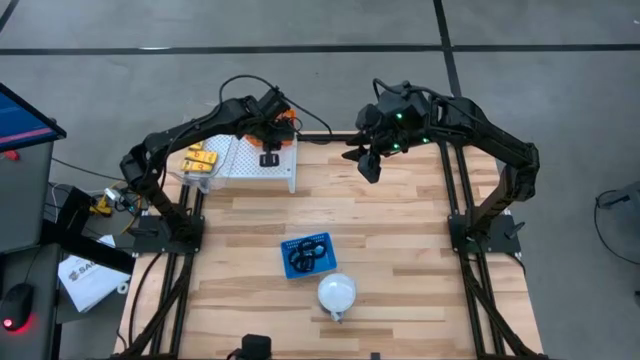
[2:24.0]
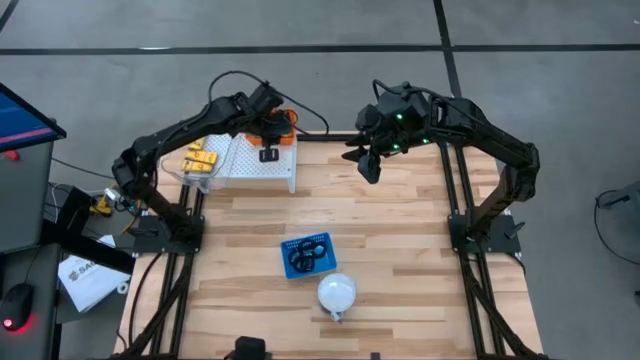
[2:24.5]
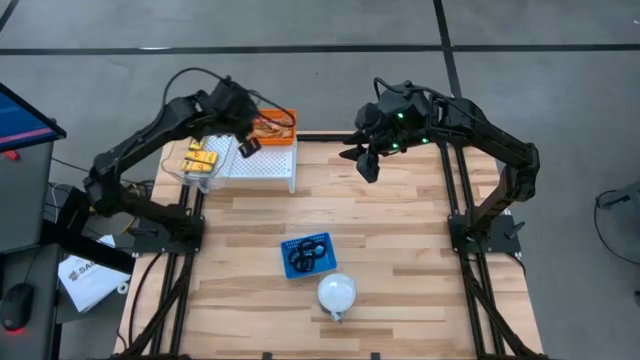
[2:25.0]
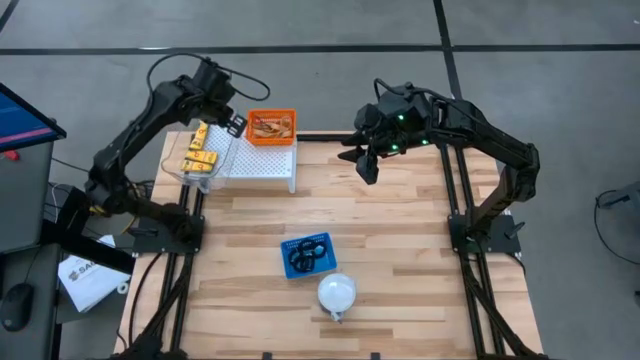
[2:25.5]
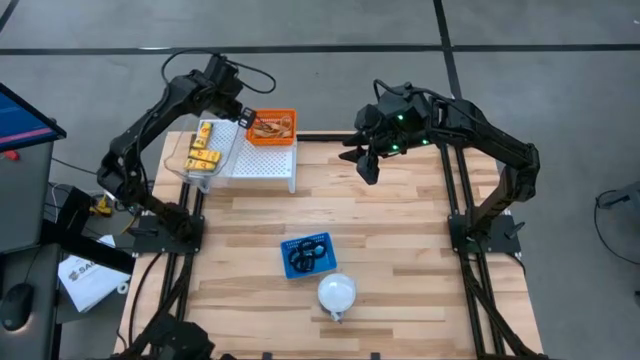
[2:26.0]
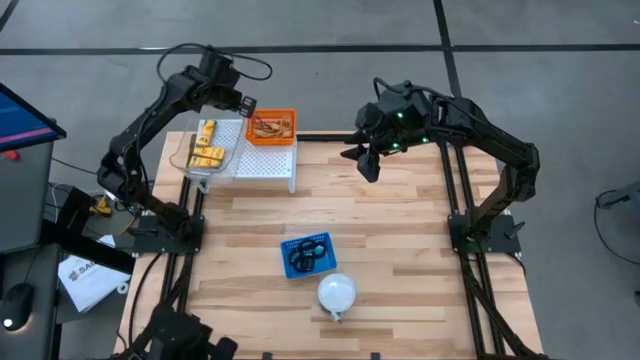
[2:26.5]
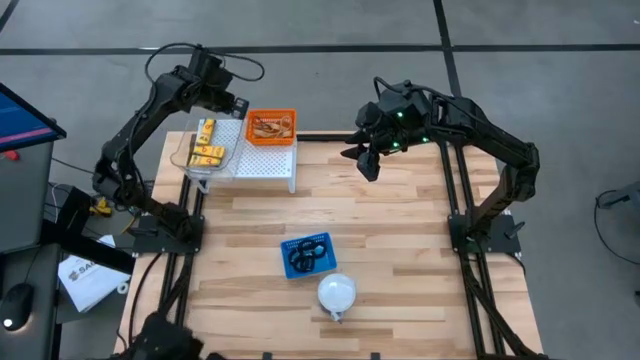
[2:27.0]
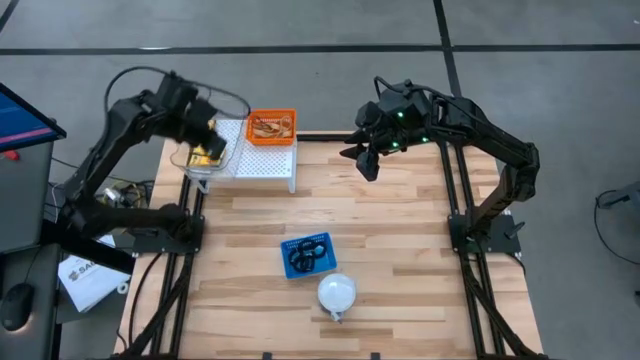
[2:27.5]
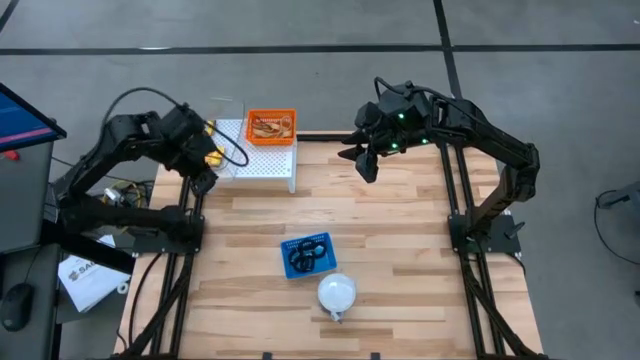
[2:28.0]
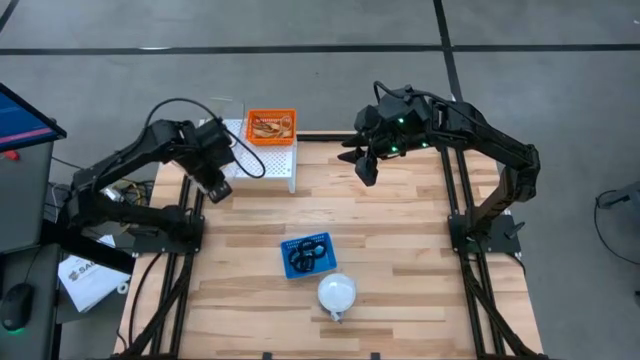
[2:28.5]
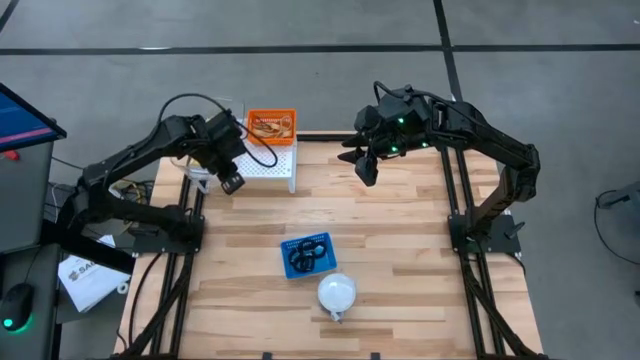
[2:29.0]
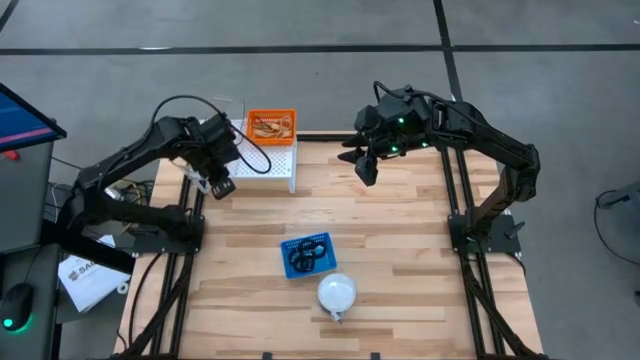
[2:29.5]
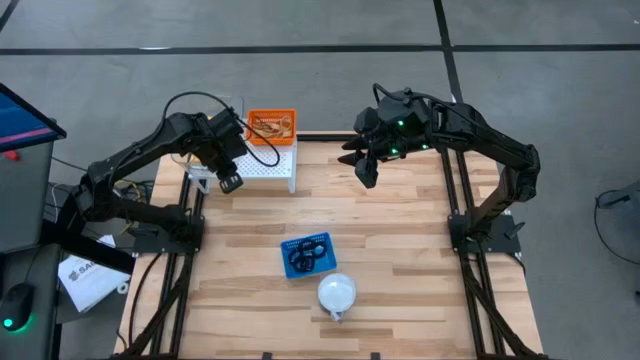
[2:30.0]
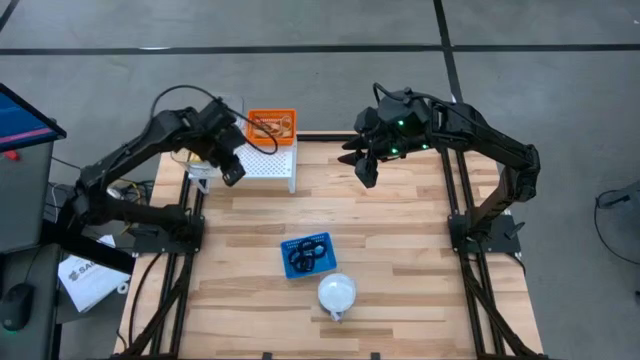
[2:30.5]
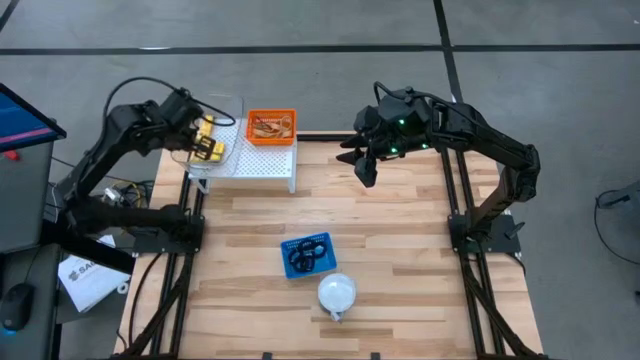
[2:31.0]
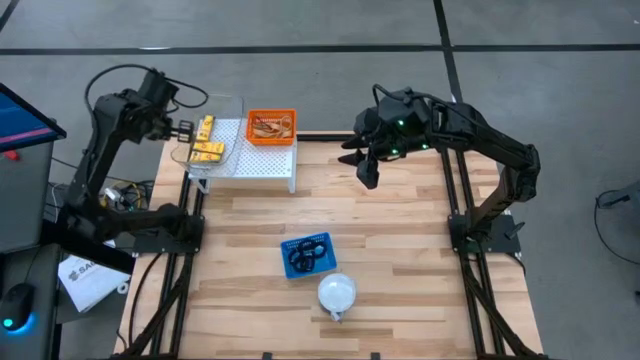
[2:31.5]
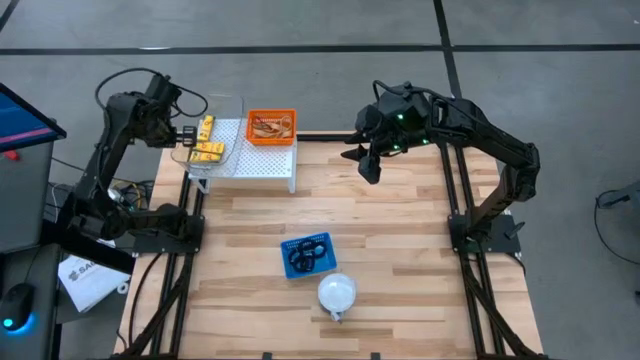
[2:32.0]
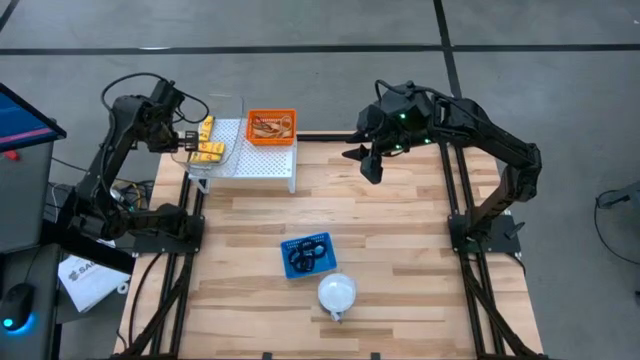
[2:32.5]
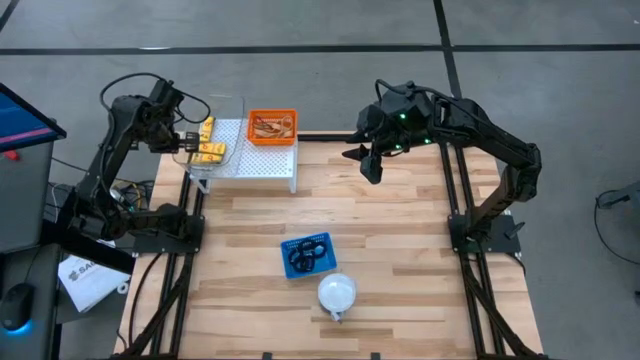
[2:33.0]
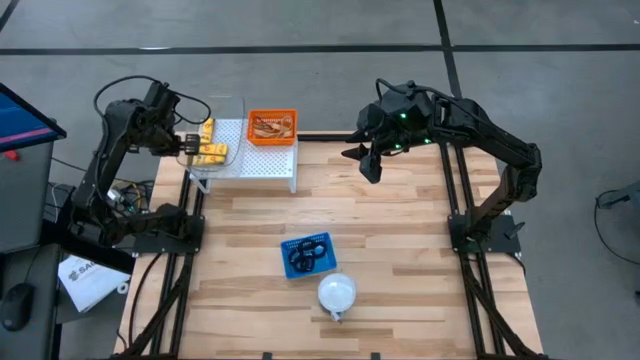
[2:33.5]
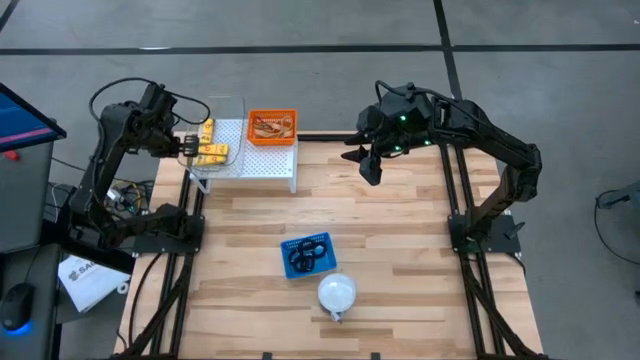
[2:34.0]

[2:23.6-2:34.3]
Task: Pick & Place Office Desk Supplies
Adjust the transparent bin on the shelf

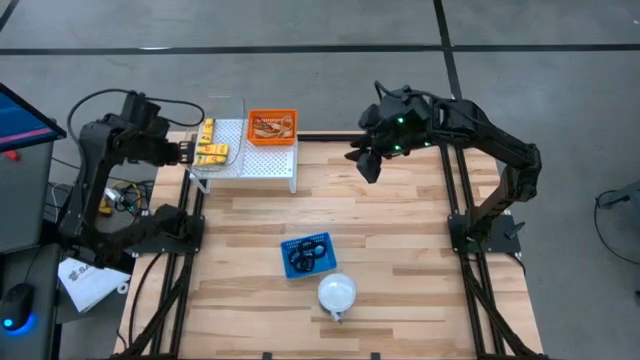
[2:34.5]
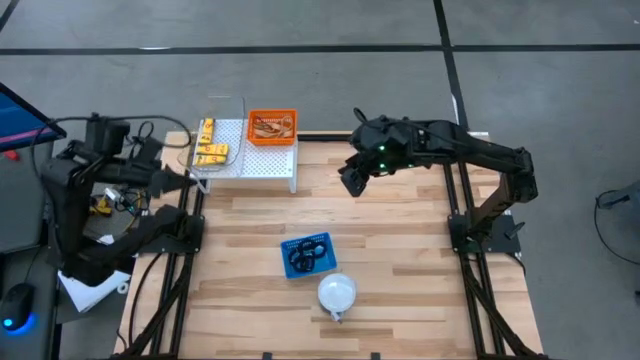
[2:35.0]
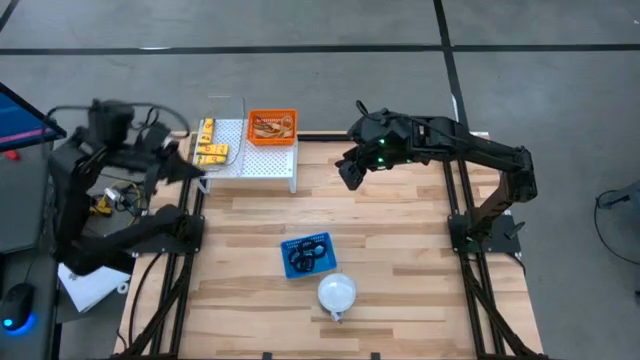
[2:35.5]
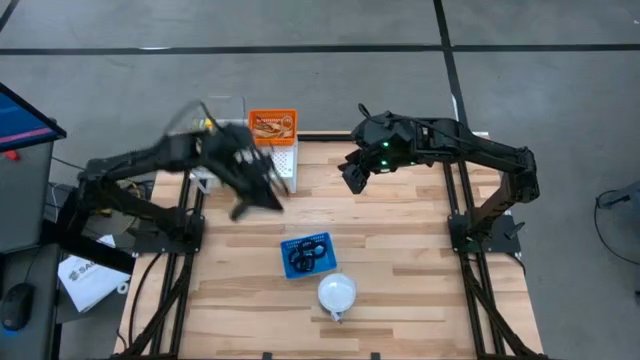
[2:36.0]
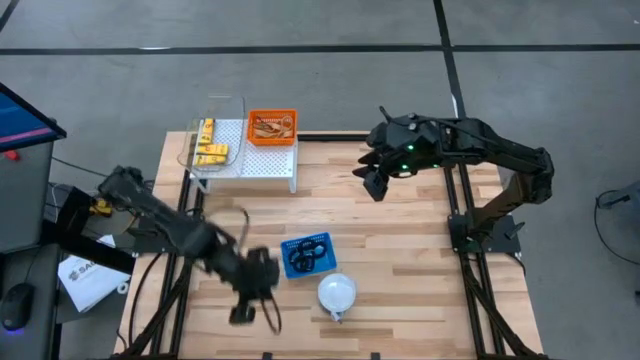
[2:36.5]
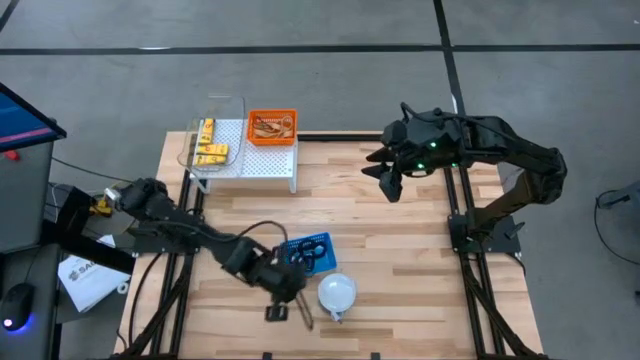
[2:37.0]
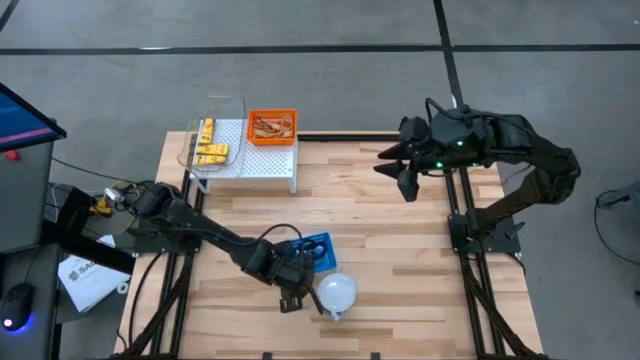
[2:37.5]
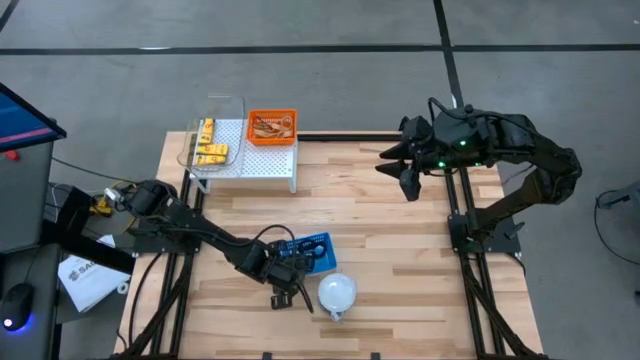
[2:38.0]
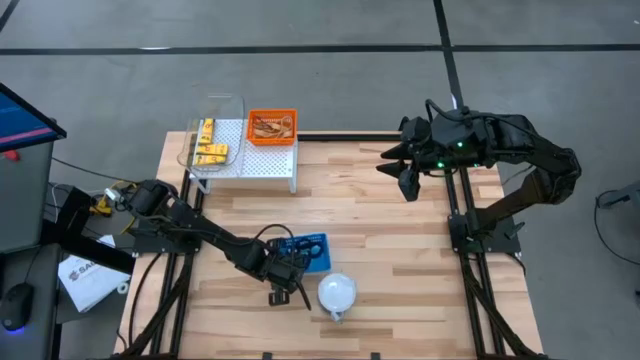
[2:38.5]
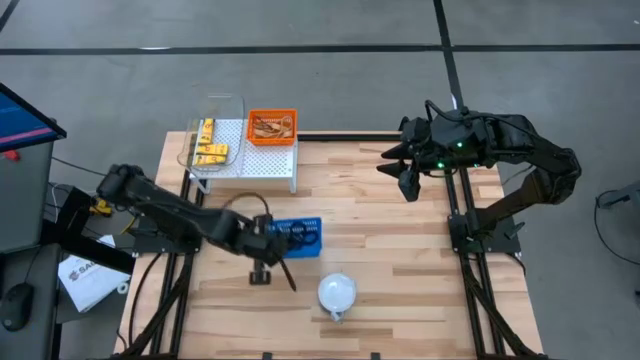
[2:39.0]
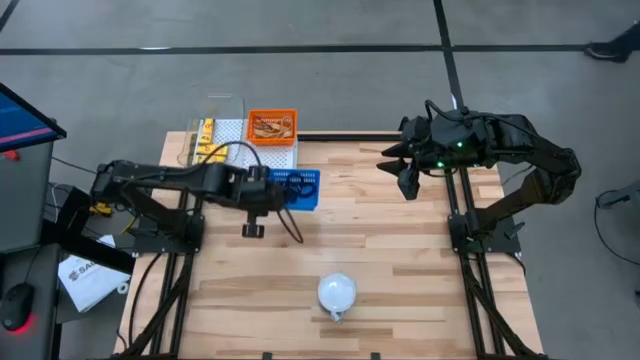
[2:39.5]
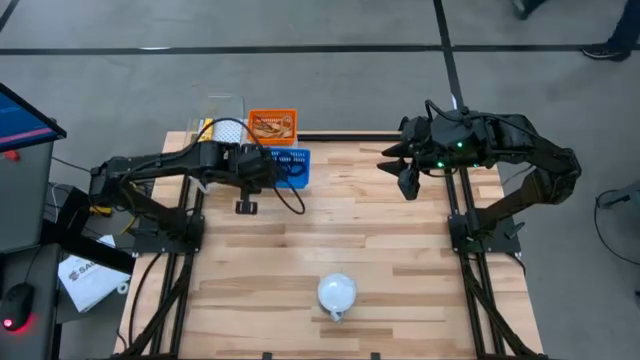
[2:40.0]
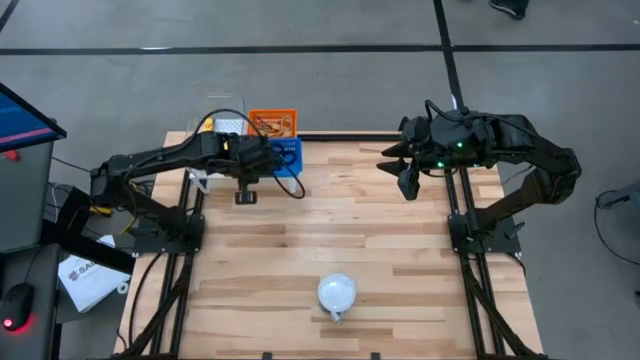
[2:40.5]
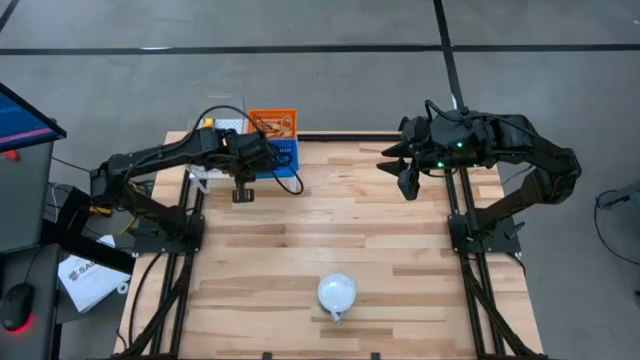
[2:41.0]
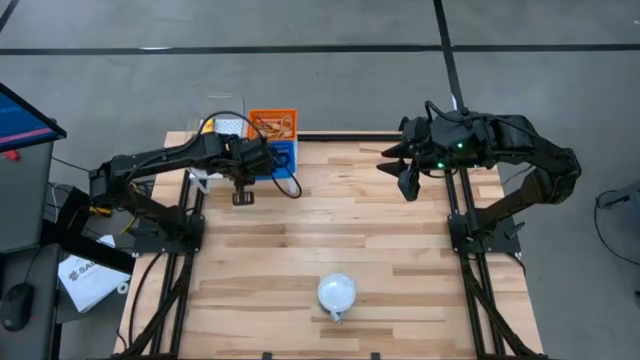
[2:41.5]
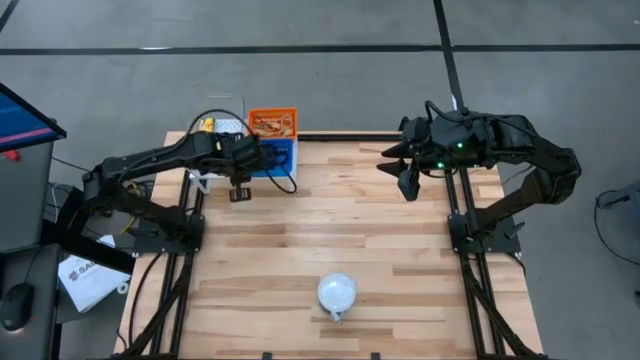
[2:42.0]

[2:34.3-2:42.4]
Put the blue basket with filled spring keychains on the shelf

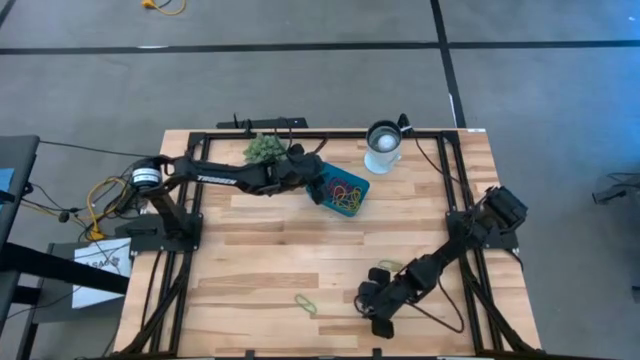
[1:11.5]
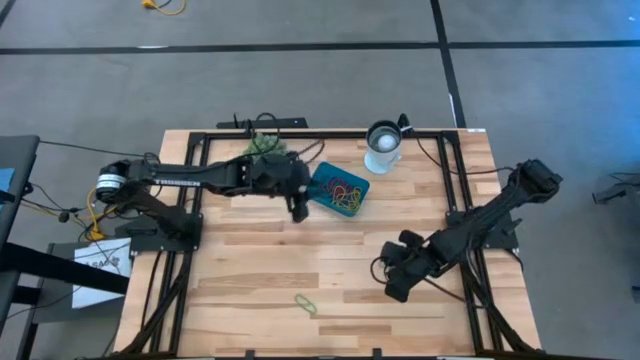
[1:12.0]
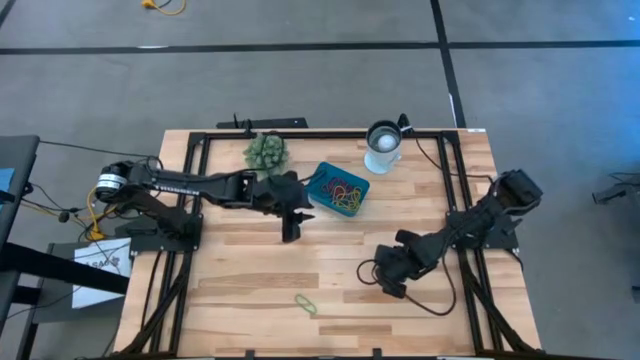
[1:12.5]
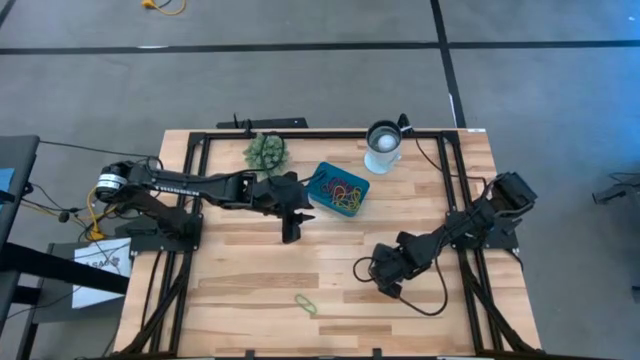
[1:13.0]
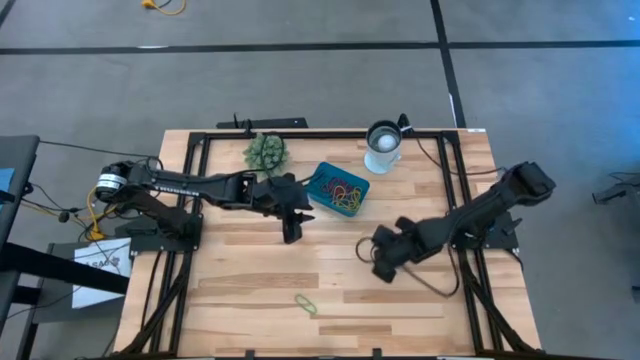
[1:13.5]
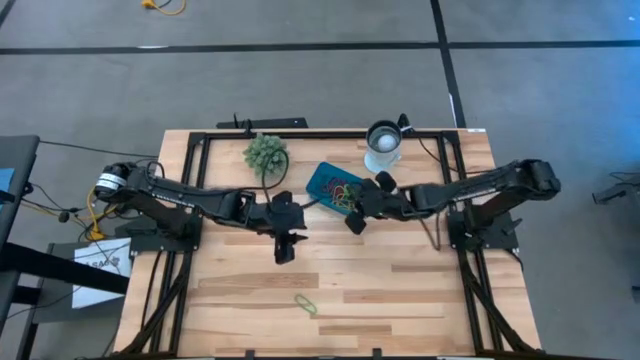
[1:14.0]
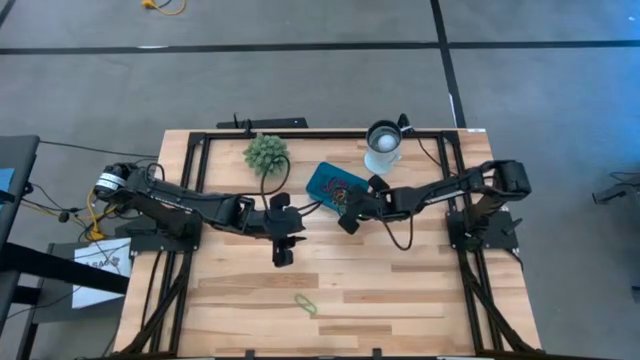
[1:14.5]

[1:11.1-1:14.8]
Task: Pick and place items into bin
Put the green rubber band into the blue bin
